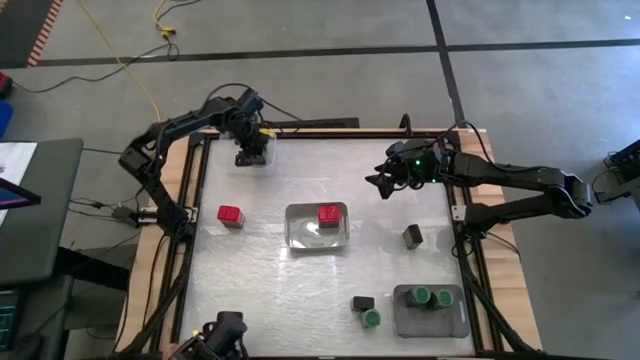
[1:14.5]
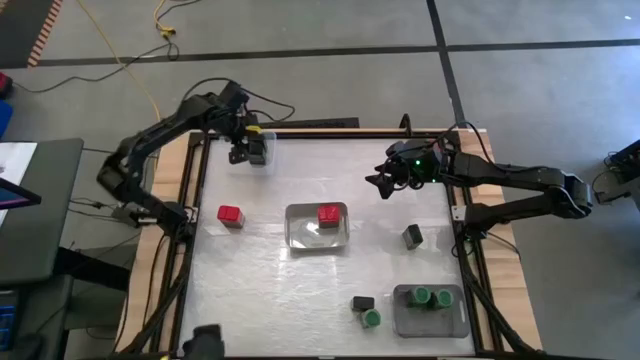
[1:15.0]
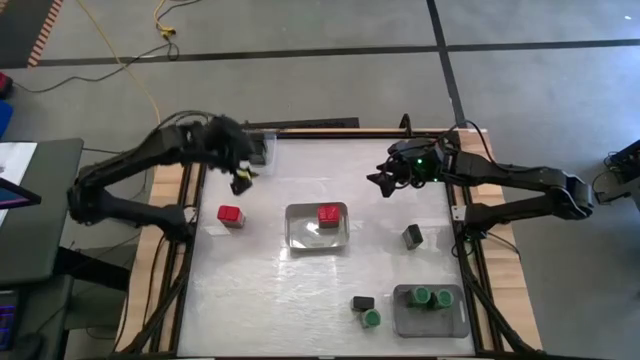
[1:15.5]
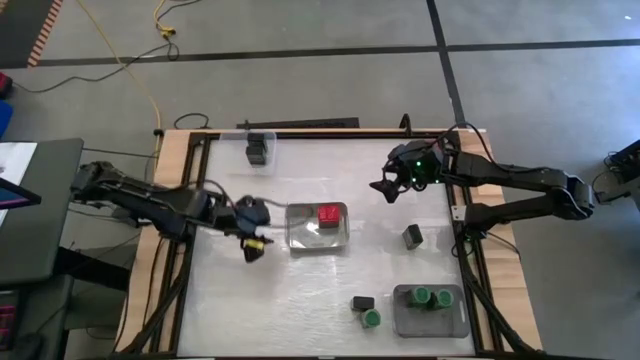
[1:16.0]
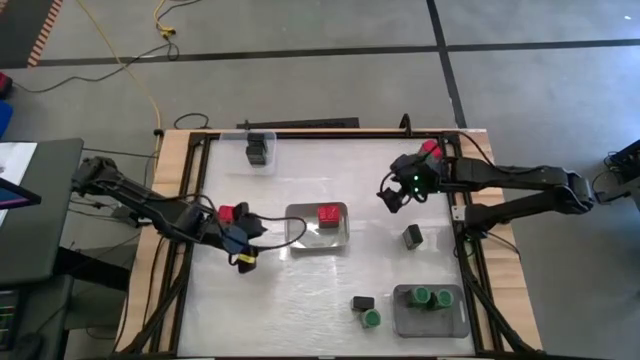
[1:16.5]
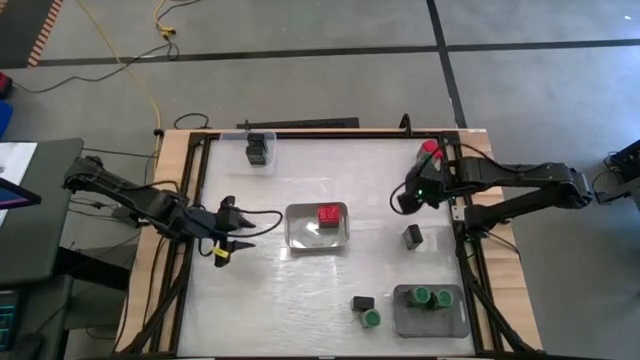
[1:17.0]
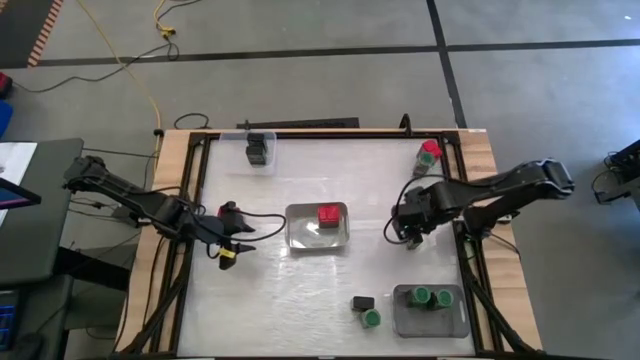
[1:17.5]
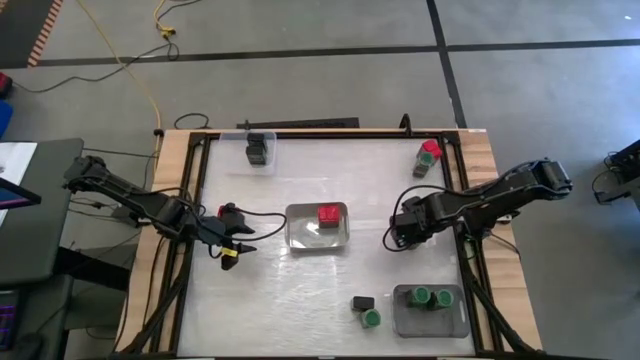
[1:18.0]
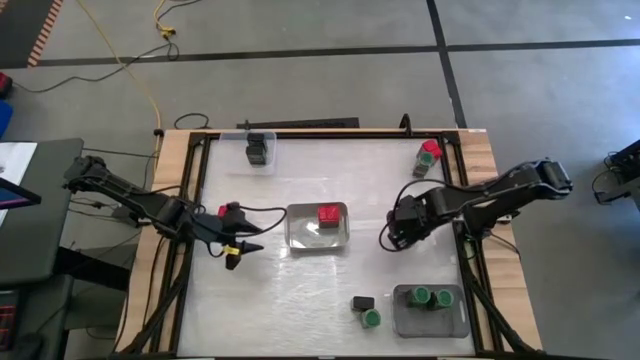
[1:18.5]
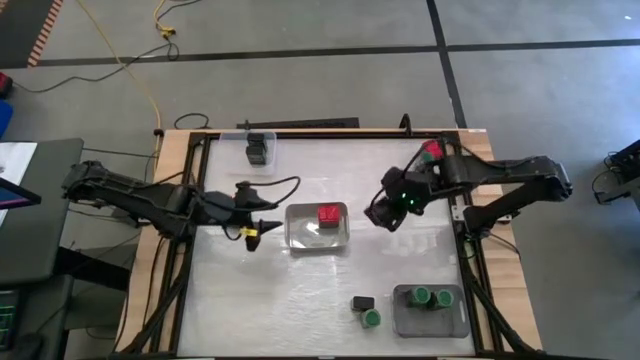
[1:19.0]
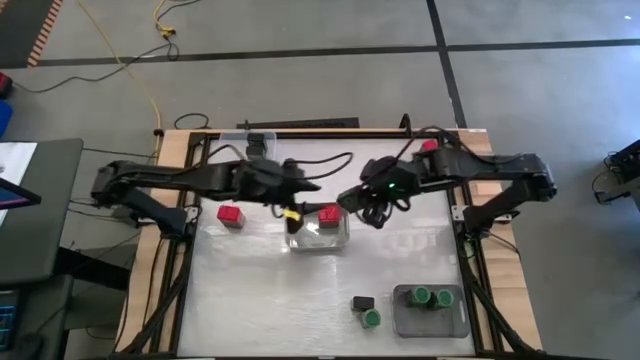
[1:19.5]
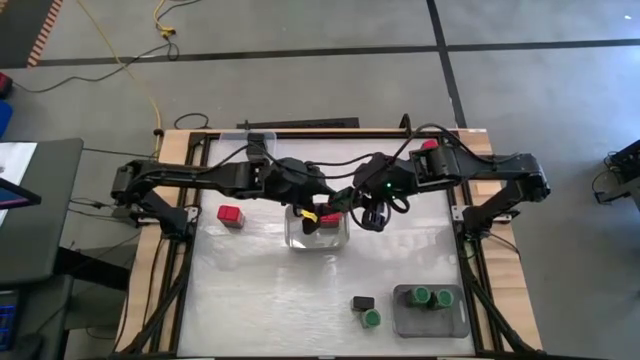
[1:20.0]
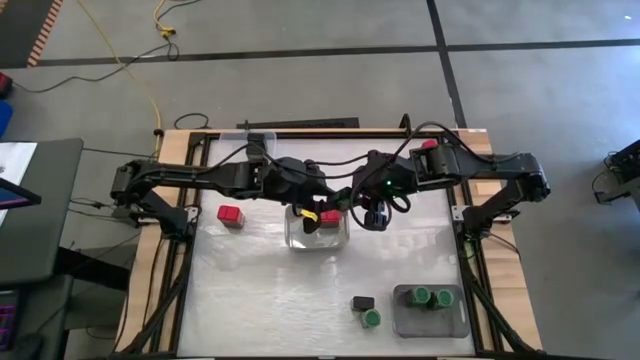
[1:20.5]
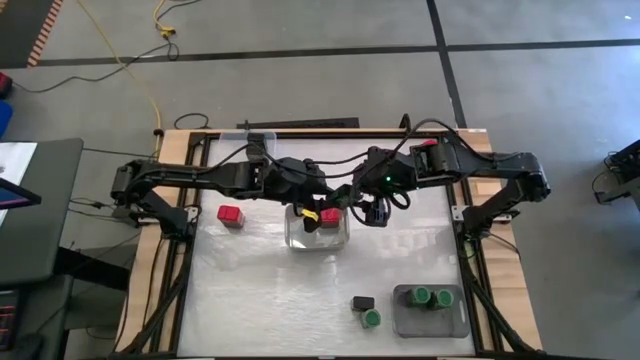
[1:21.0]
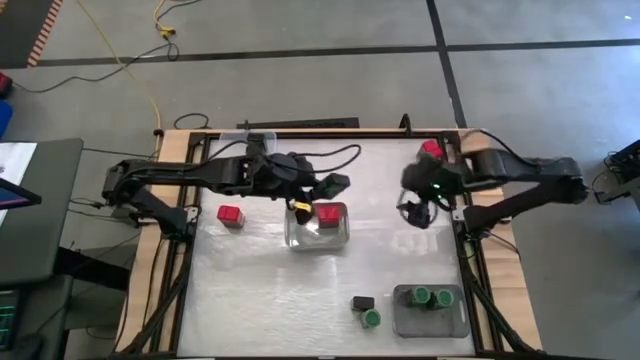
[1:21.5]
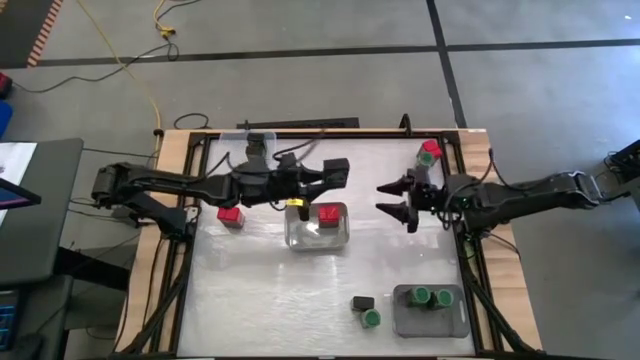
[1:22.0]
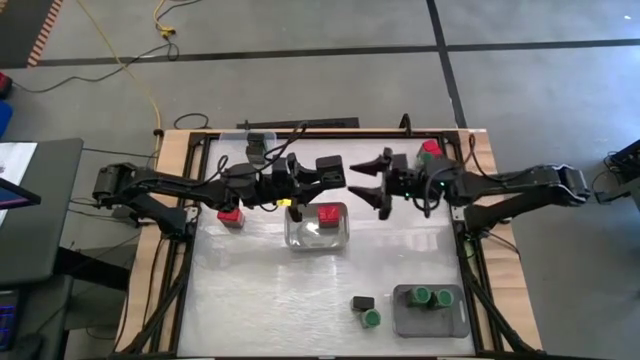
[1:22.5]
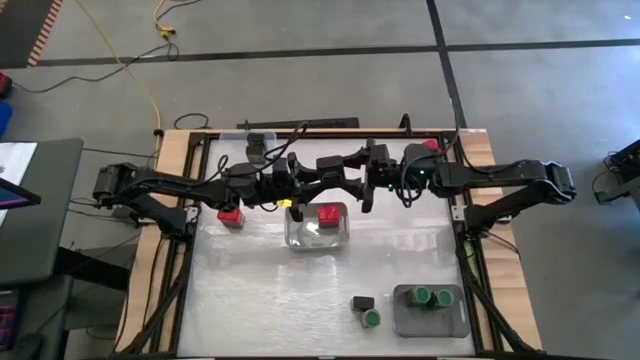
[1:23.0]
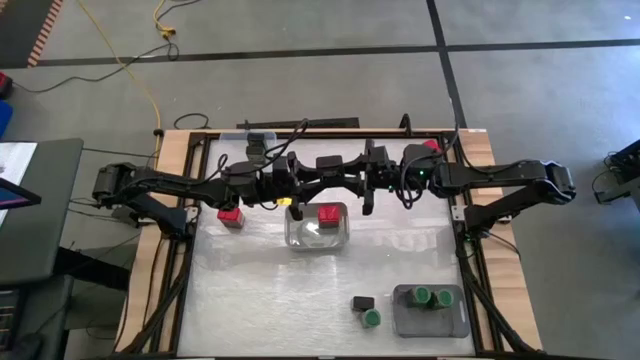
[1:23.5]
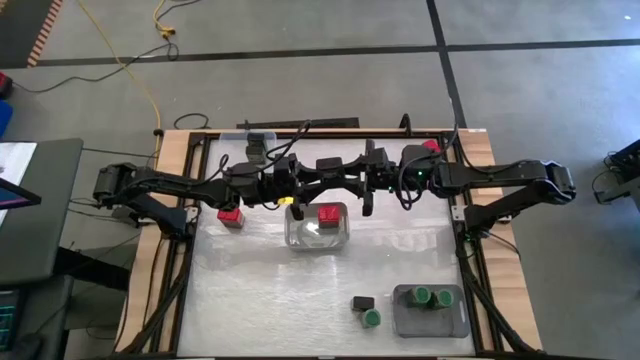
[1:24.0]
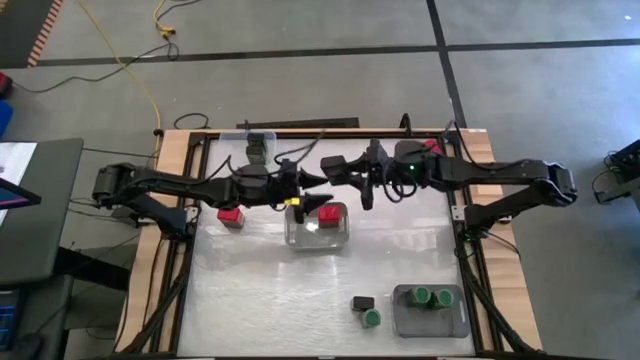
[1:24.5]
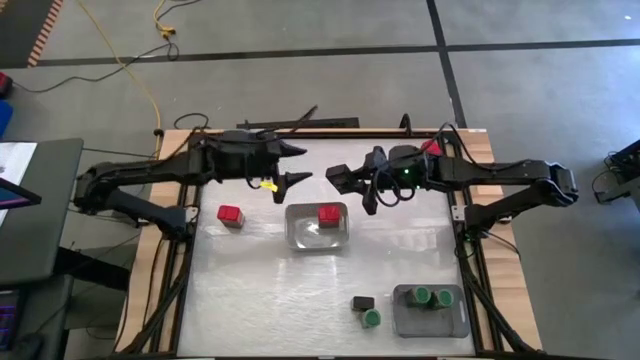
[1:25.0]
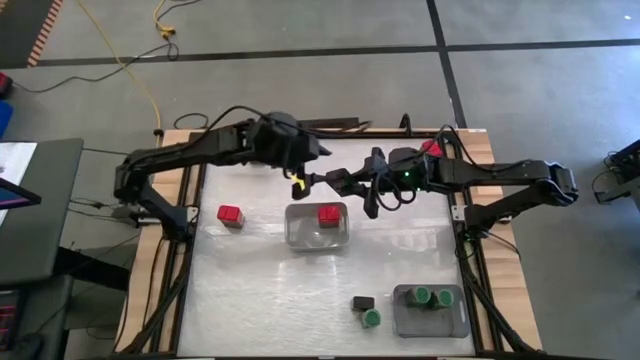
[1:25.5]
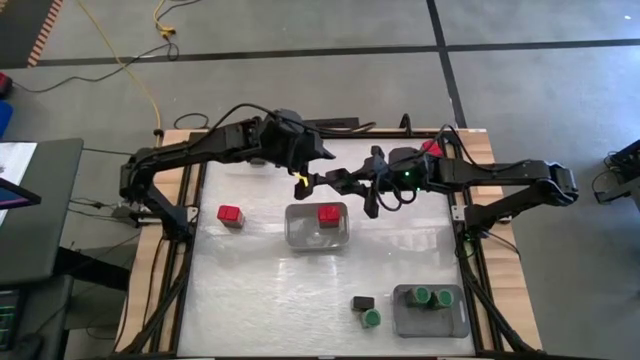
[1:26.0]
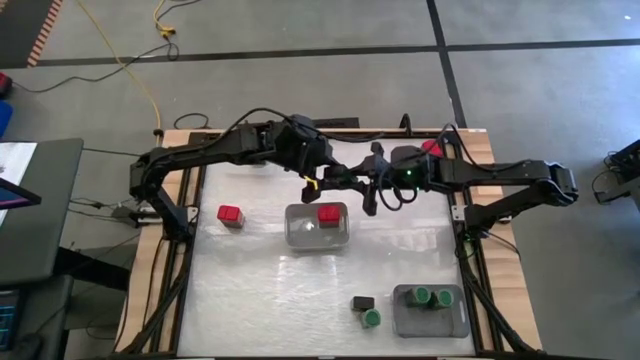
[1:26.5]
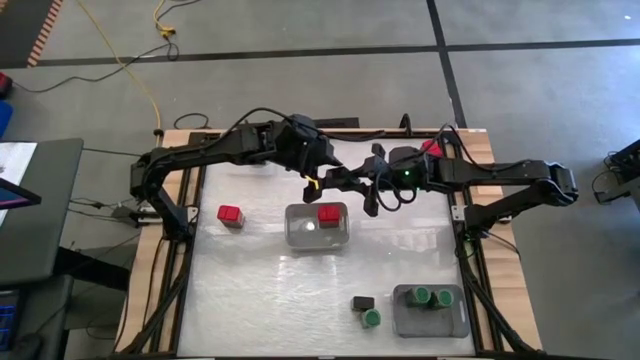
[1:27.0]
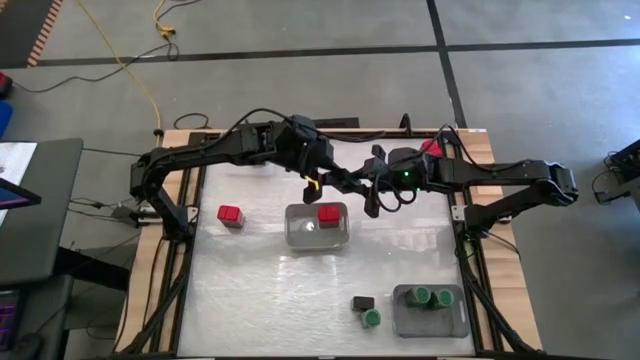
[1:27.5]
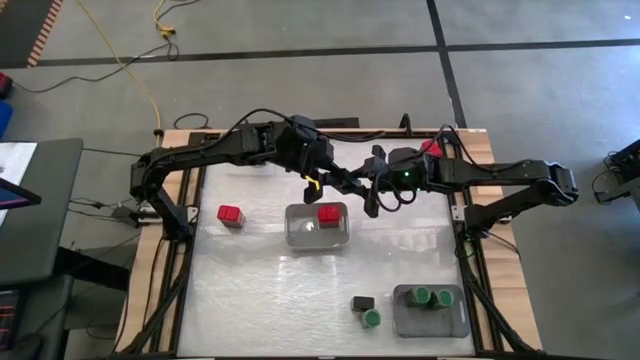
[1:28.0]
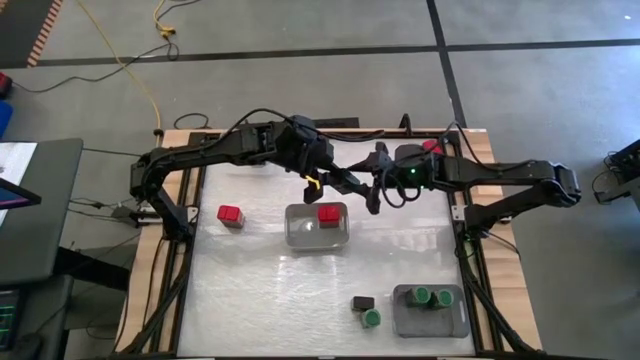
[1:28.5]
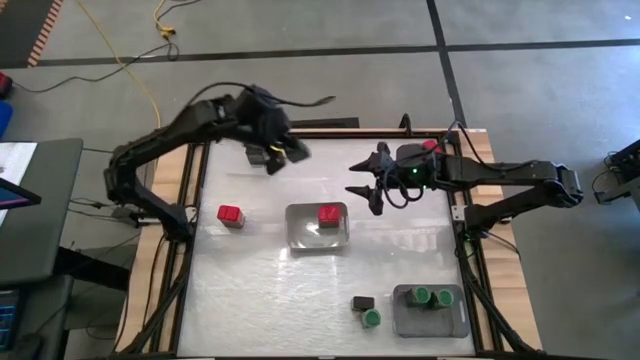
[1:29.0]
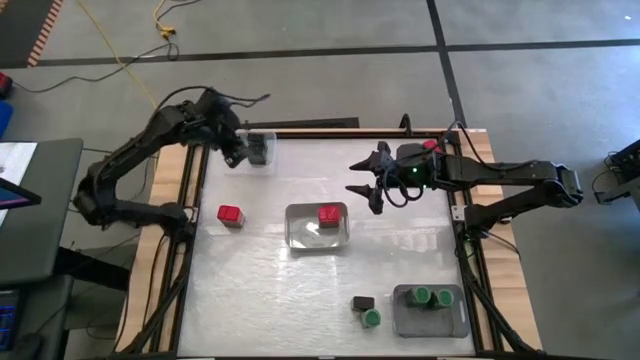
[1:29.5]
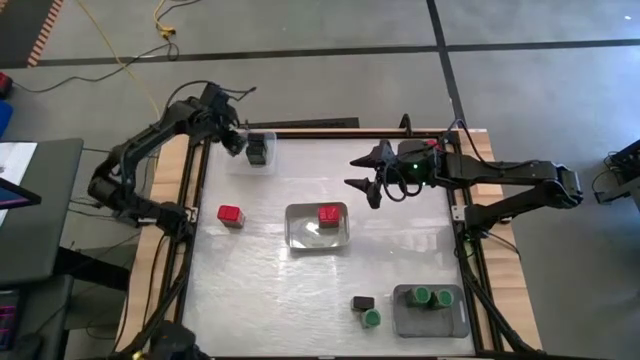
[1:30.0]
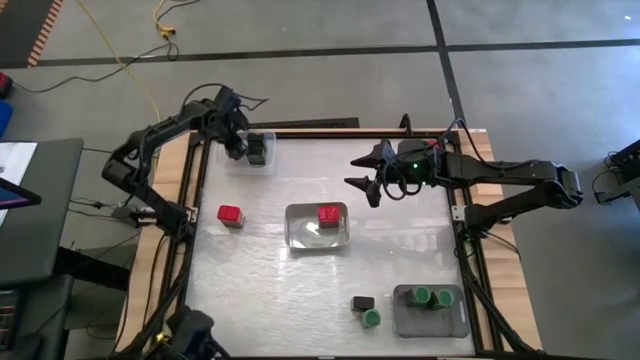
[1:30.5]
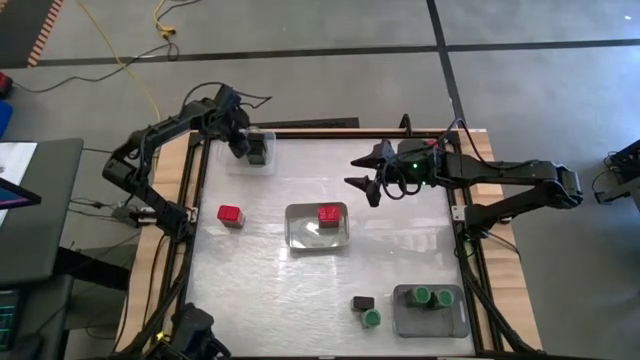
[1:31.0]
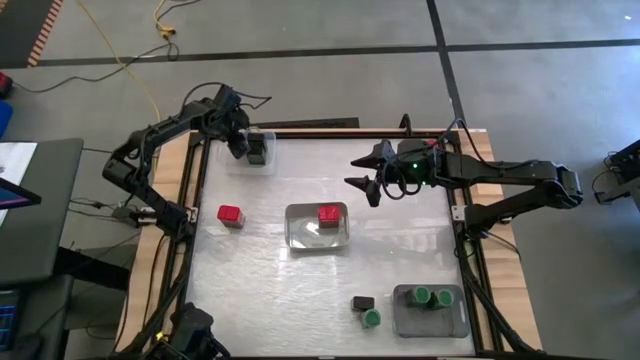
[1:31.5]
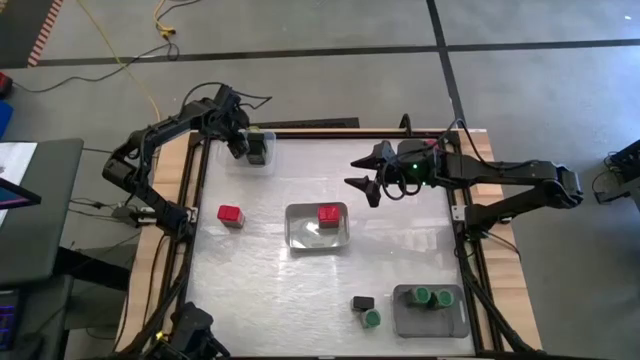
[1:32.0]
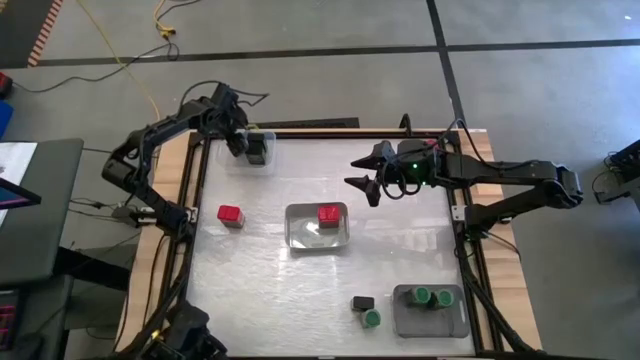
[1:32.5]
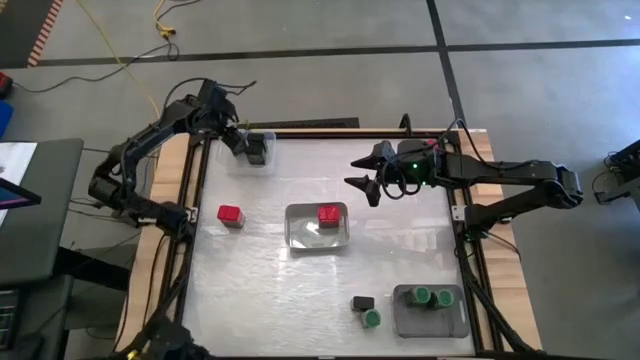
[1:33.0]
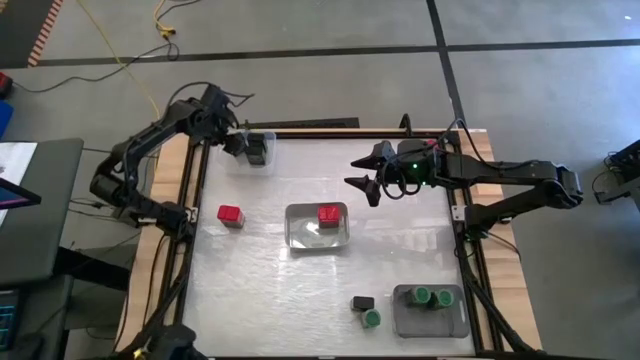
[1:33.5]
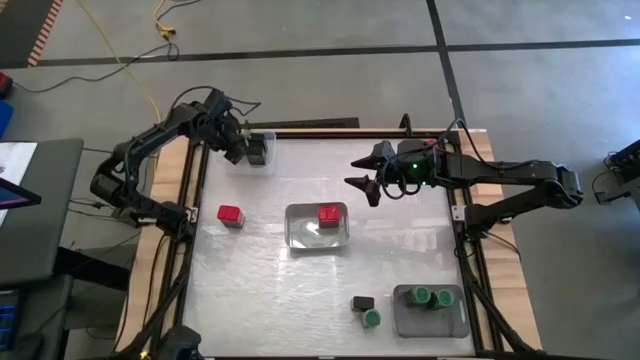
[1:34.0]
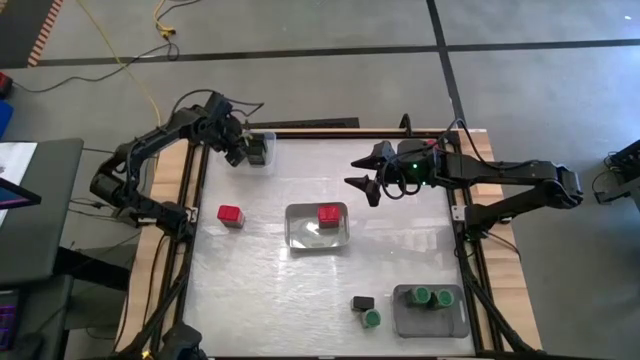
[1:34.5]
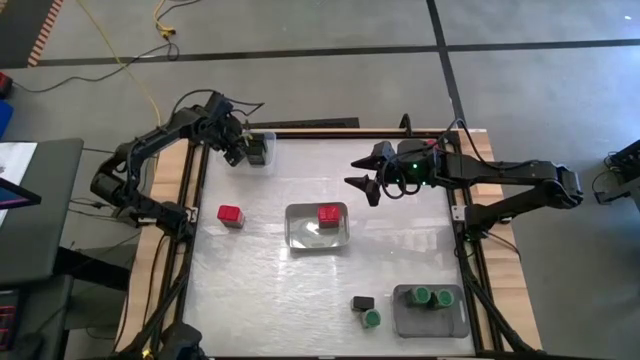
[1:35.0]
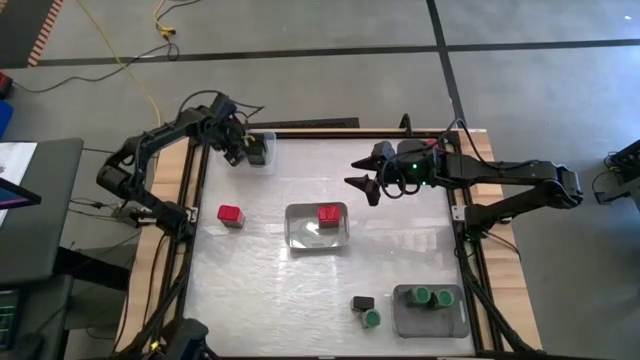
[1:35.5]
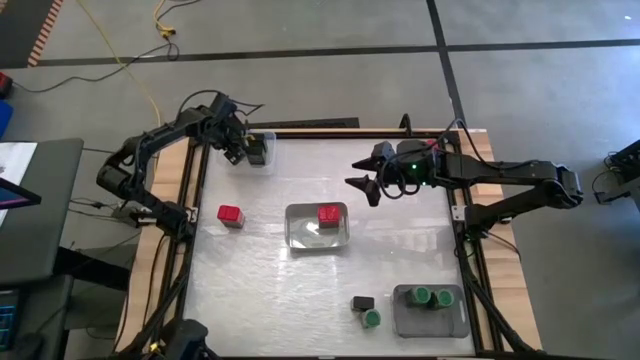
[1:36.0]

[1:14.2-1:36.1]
Task: Sort spices by type
Put the top right black seasoning can into the transparent bin
